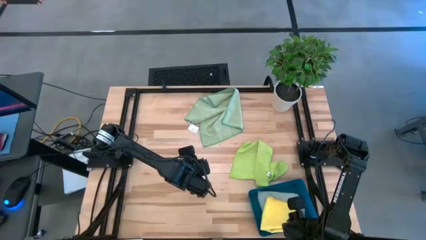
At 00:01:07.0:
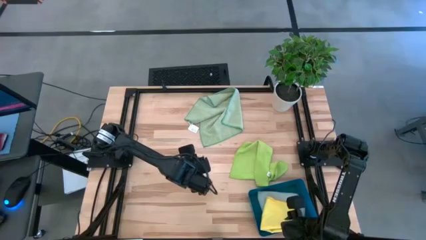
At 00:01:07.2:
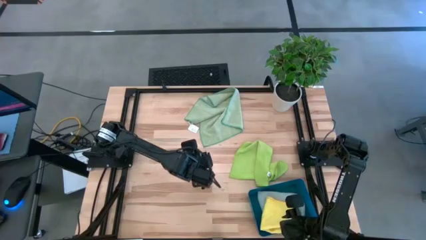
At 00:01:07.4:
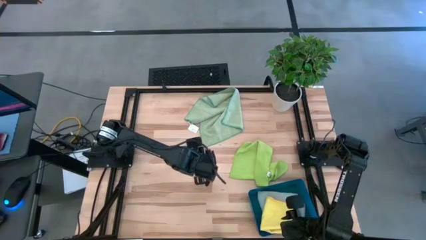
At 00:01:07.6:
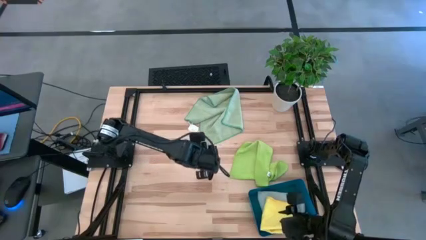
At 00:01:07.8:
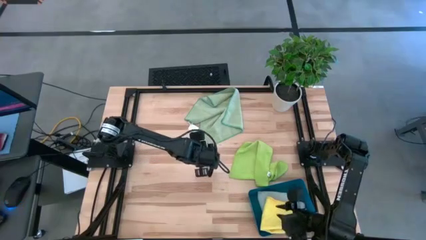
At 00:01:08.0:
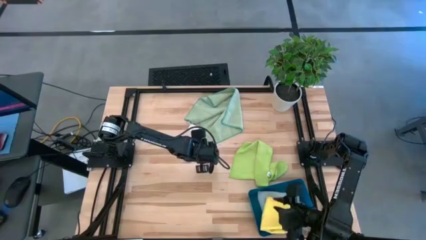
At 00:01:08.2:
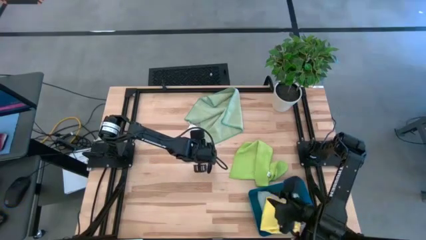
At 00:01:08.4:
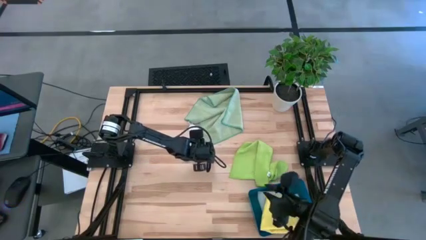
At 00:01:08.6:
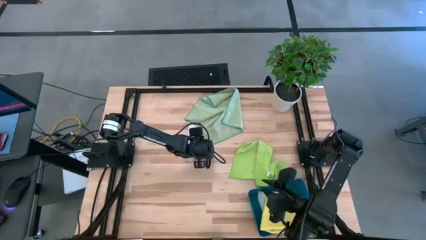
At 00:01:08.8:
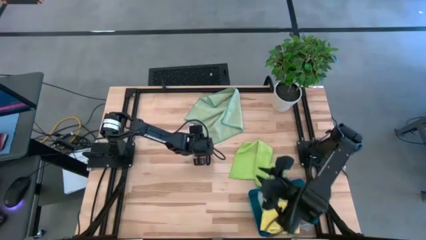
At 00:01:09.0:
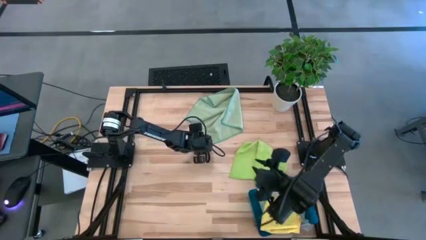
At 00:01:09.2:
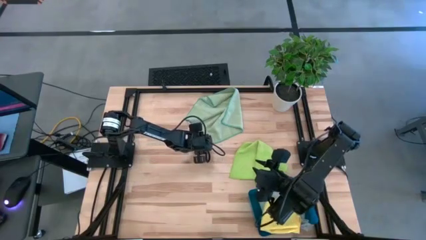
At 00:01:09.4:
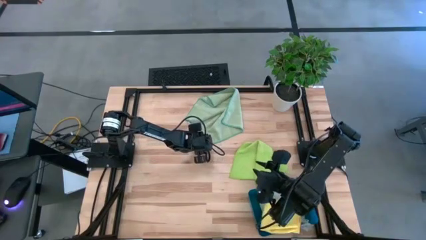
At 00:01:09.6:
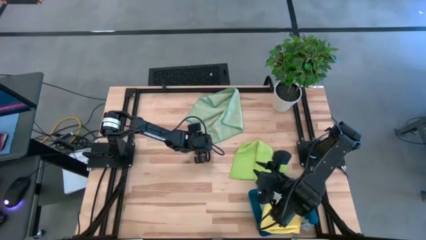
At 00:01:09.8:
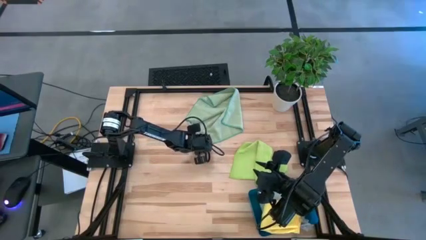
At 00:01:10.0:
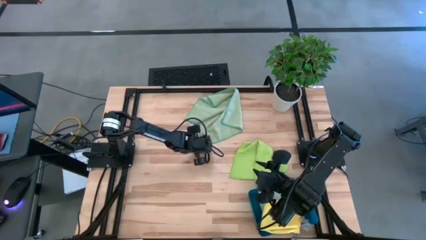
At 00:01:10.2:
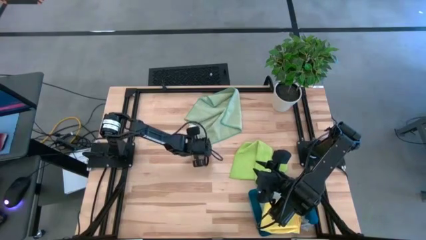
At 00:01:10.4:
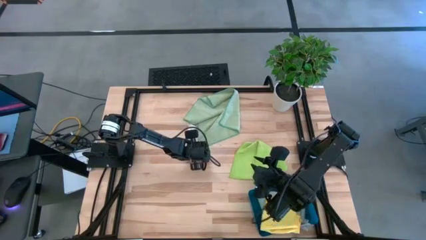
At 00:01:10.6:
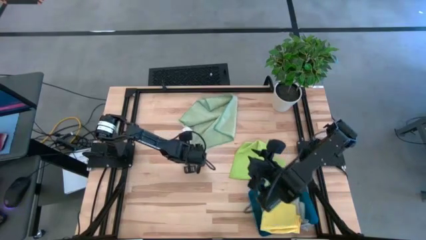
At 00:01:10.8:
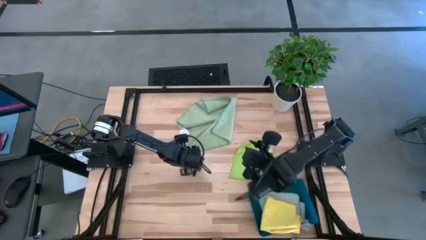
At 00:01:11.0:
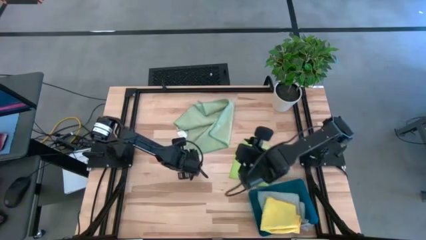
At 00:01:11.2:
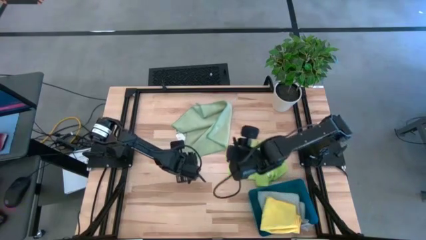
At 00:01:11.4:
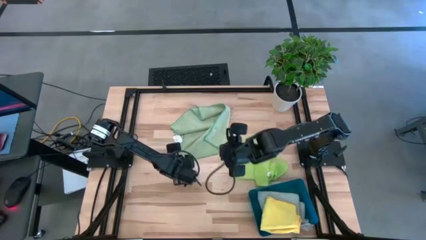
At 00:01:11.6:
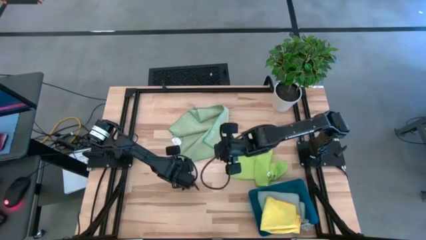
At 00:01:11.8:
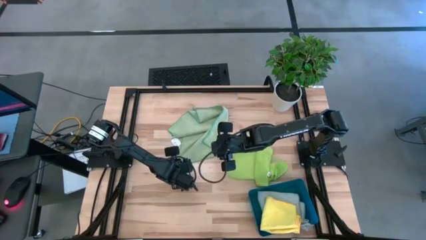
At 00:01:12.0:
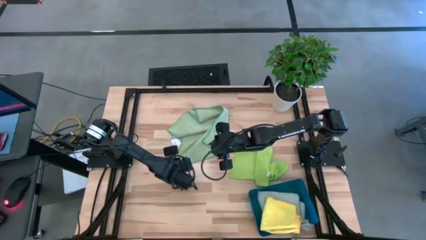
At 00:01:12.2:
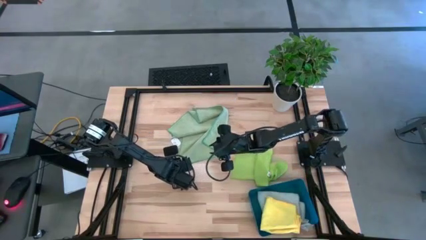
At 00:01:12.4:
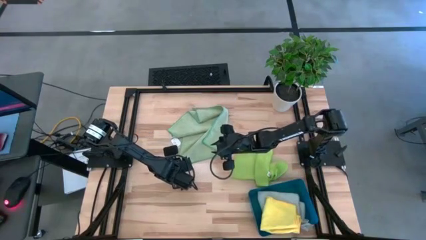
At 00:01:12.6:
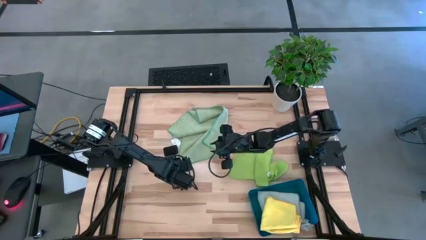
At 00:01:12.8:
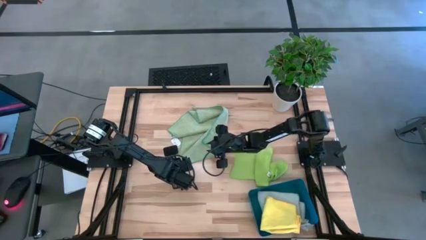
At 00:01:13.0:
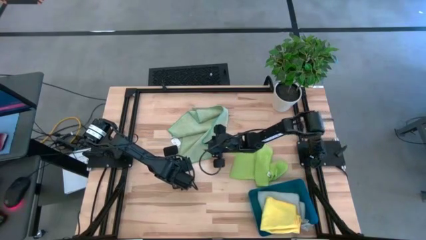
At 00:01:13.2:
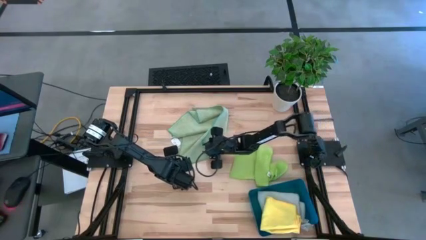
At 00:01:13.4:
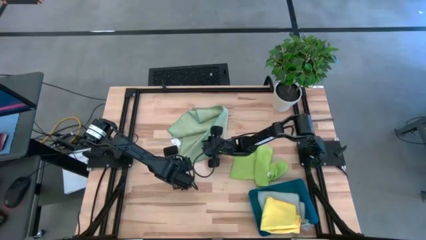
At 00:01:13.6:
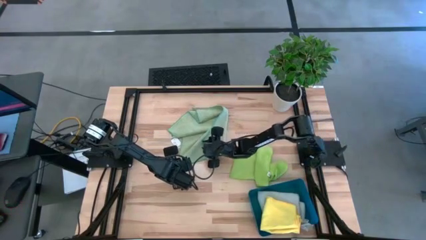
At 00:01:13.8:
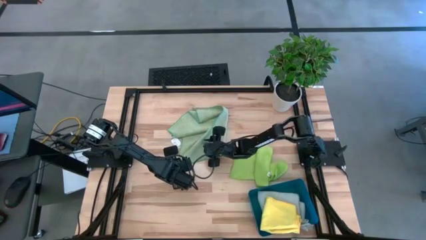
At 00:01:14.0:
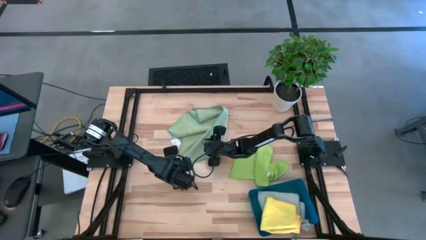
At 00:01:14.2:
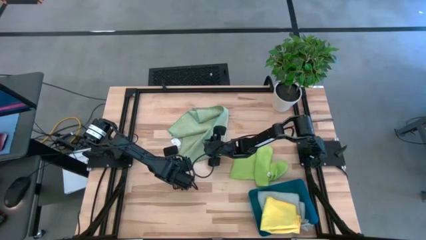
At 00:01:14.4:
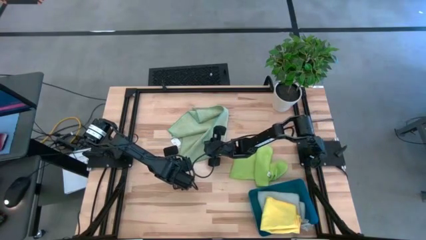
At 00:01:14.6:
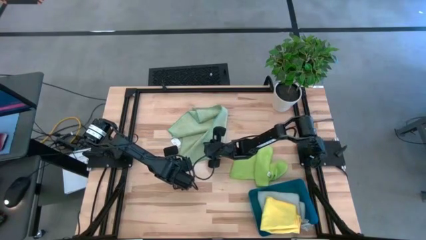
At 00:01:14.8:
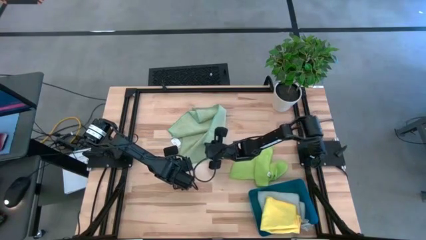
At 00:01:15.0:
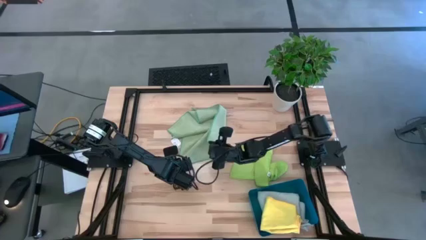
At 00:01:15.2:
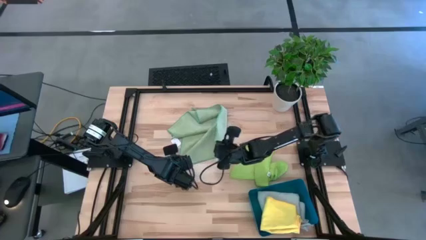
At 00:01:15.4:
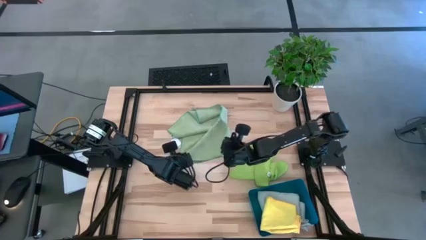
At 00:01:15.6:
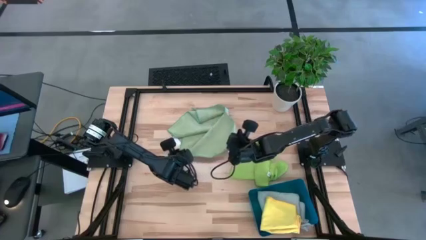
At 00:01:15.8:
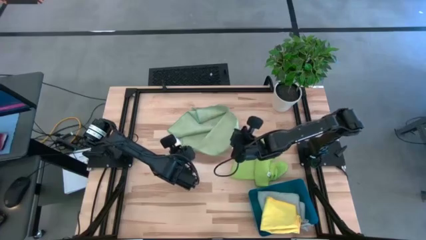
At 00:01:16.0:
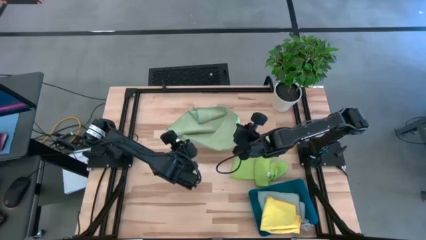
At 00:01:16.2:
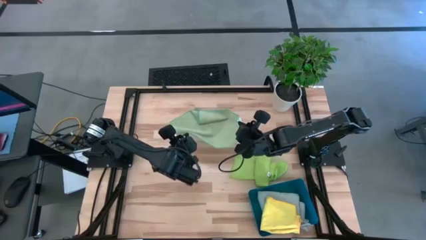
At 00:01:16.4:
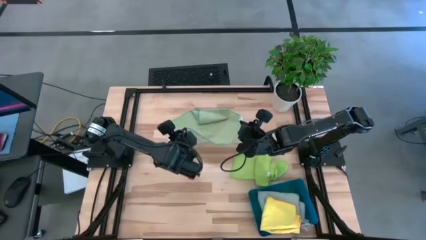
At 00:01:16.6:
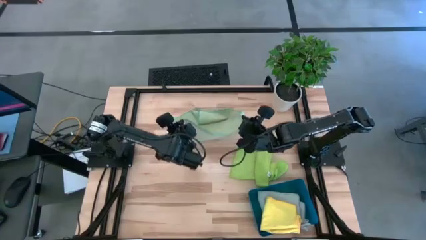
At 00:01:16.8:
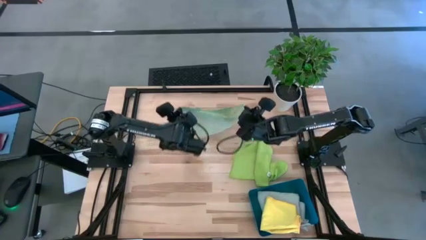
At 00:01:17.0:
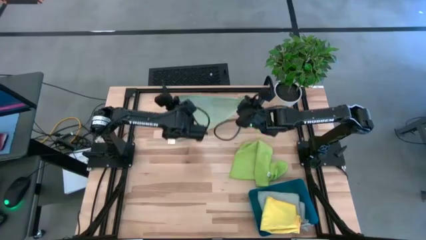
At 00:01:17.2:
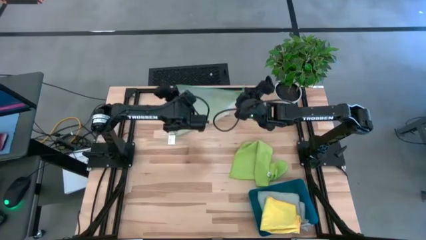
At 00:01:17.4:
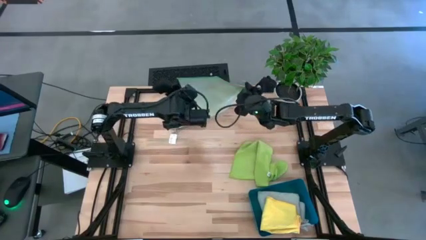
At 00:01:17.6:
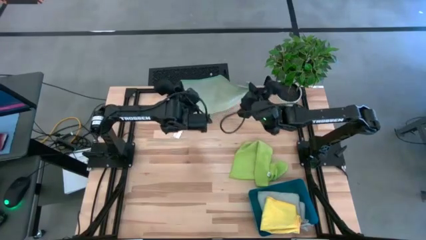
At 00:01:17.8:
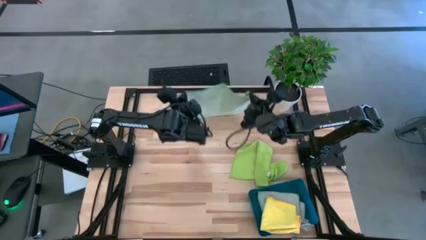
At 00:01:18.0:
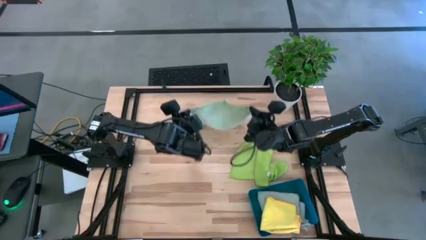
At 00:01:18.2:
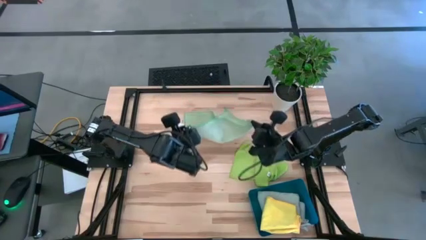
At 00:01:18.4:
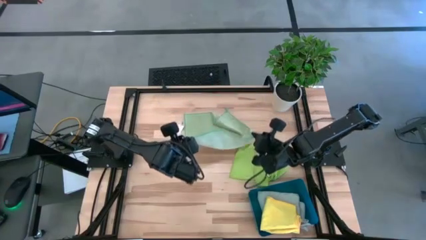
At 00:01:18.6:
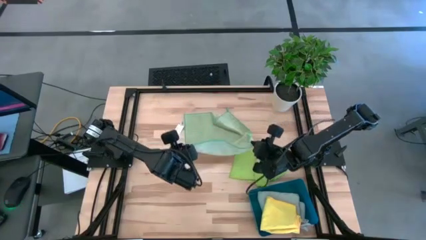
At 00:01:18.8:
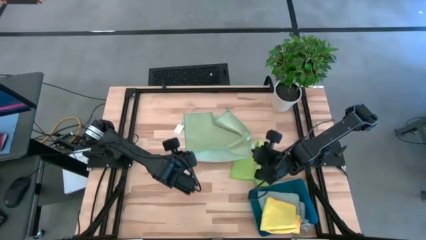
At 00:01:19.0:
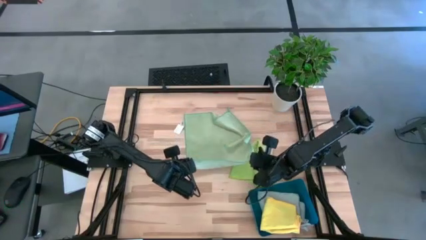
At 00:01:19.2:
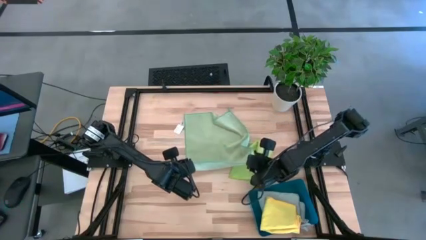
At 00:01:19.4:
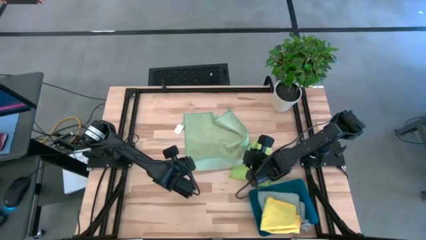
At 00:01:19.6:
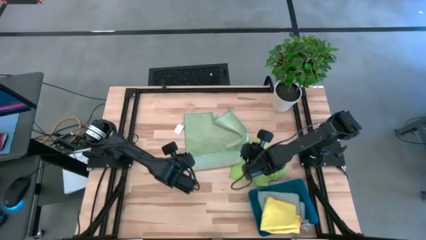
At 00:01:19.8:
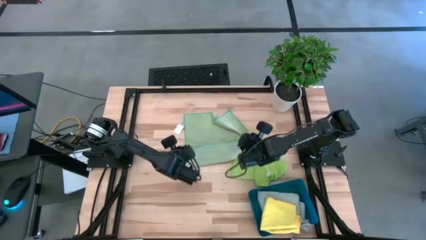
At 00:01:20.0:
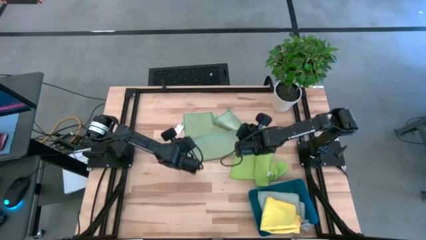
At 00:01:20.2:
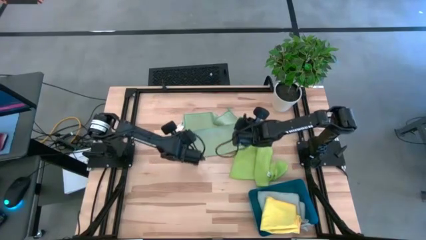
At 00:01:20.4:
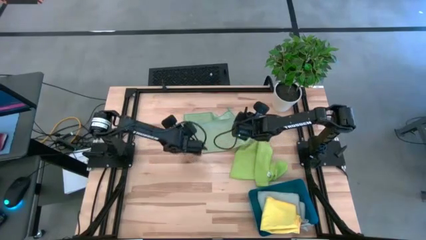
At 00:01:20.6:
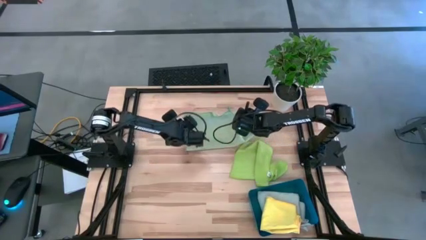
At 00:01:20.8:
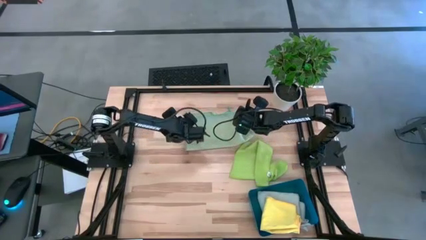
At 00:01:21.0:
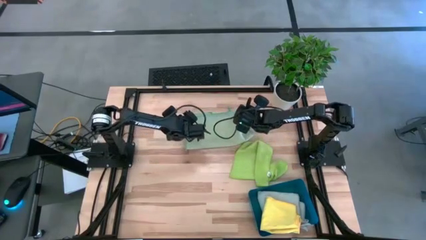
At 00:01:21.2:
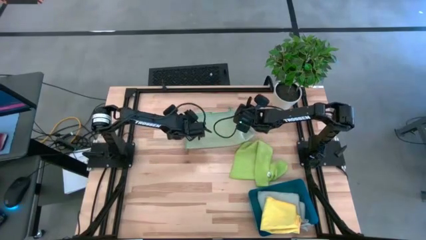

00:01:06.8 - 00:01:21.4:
Task: Fold microfiber towels
Fold the blue towel
